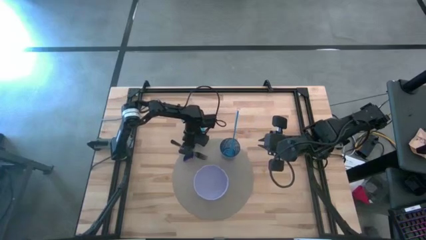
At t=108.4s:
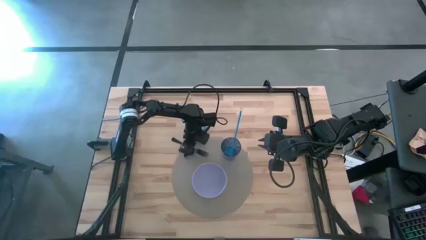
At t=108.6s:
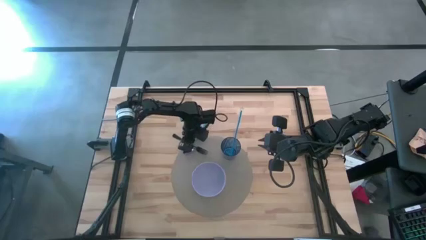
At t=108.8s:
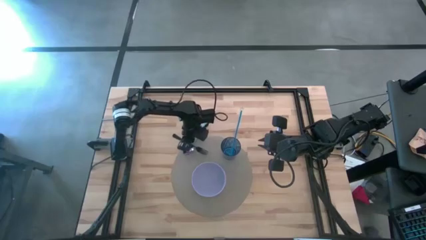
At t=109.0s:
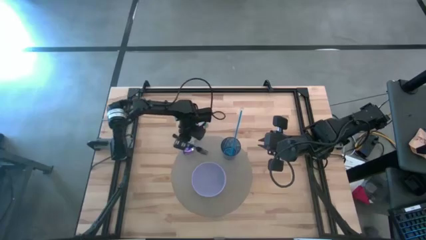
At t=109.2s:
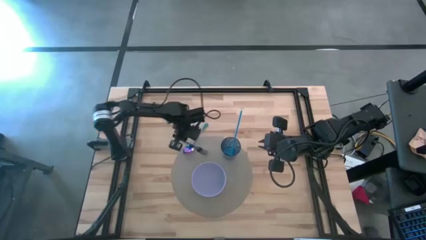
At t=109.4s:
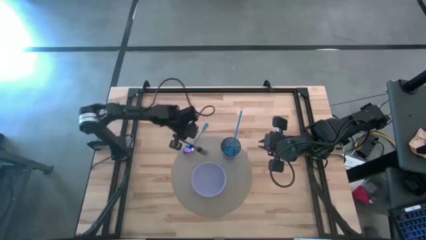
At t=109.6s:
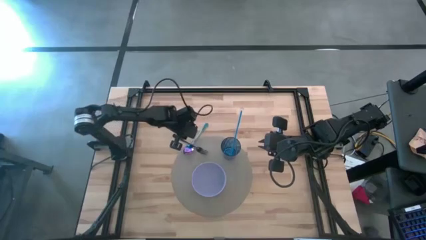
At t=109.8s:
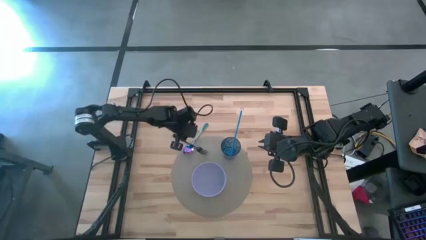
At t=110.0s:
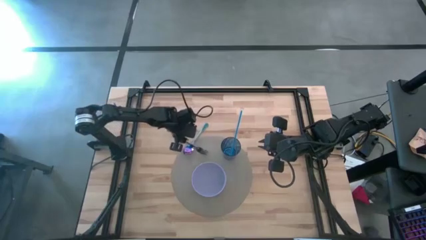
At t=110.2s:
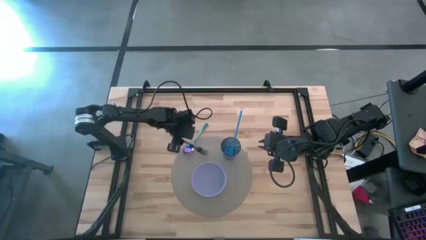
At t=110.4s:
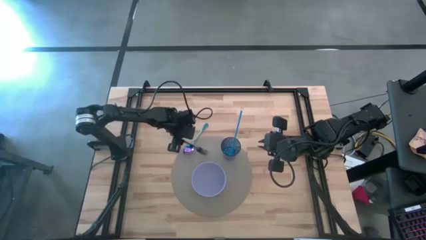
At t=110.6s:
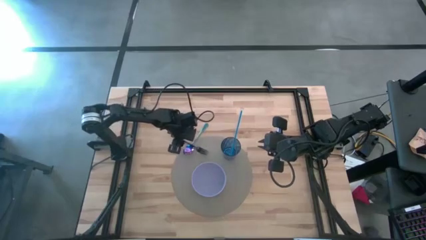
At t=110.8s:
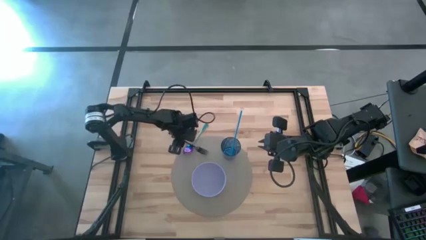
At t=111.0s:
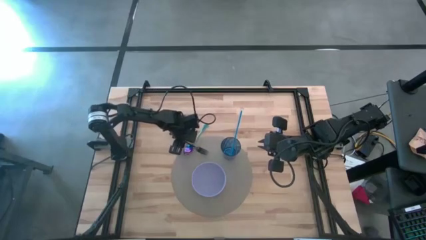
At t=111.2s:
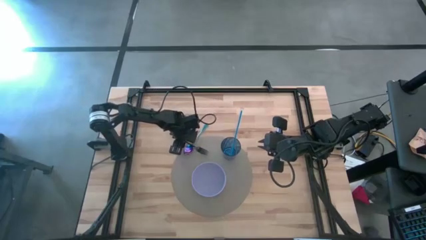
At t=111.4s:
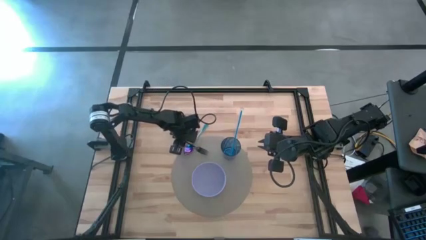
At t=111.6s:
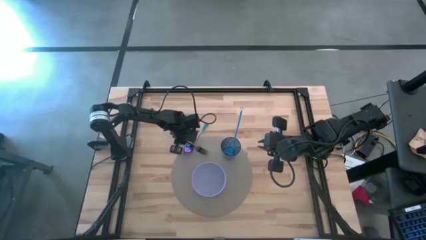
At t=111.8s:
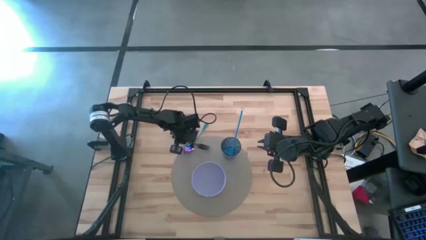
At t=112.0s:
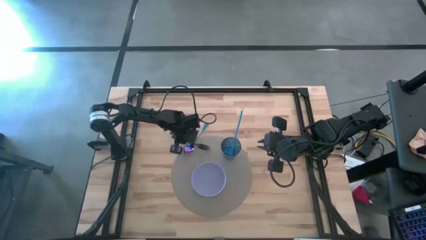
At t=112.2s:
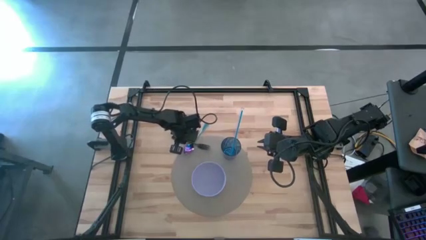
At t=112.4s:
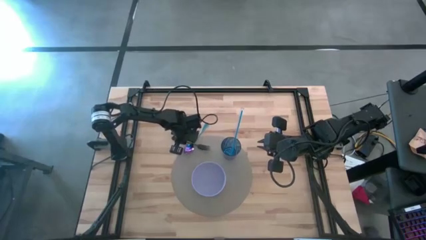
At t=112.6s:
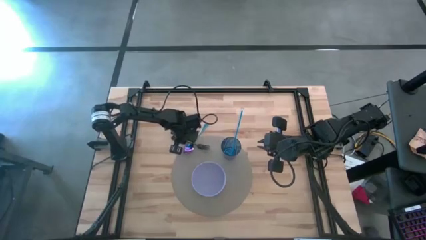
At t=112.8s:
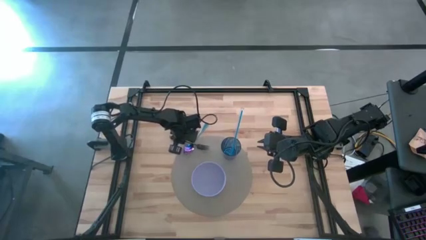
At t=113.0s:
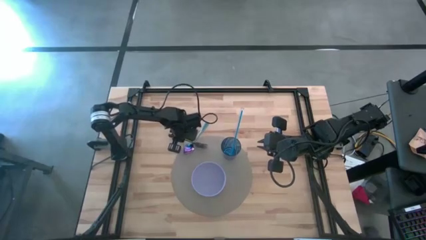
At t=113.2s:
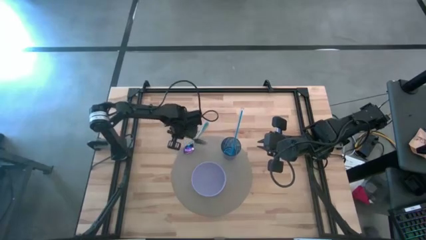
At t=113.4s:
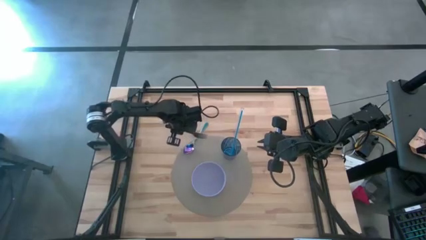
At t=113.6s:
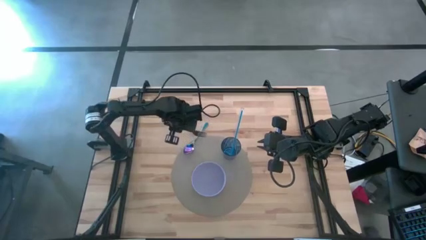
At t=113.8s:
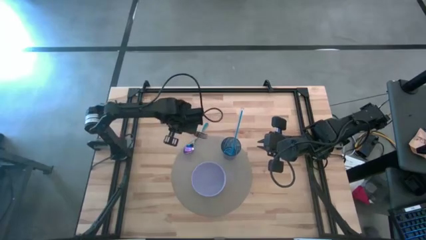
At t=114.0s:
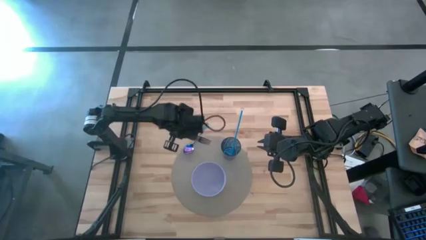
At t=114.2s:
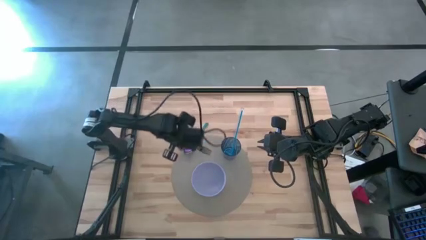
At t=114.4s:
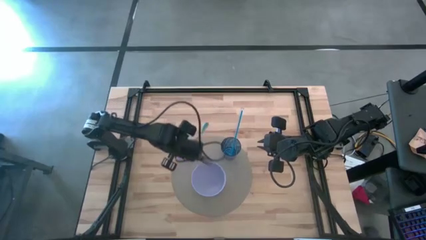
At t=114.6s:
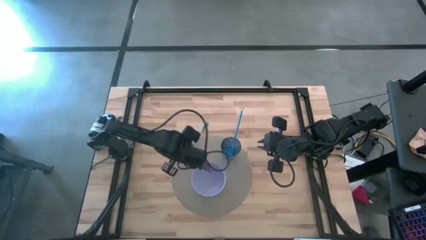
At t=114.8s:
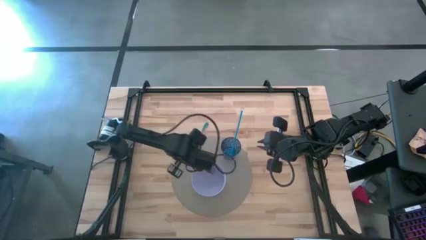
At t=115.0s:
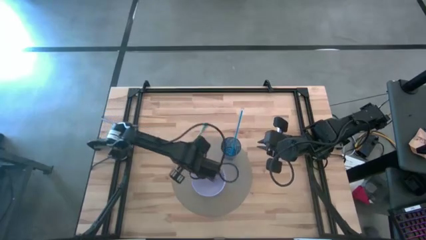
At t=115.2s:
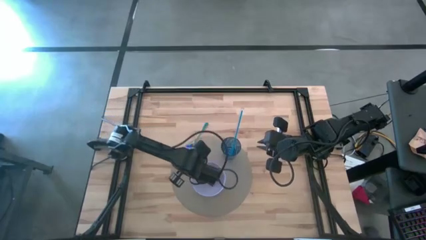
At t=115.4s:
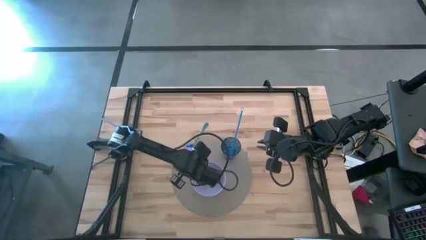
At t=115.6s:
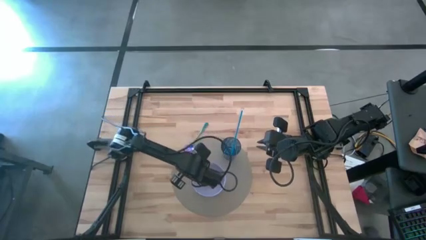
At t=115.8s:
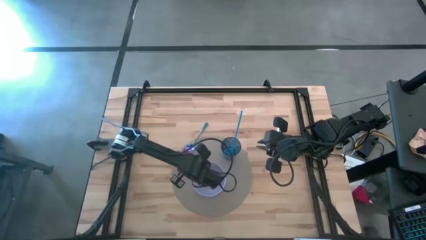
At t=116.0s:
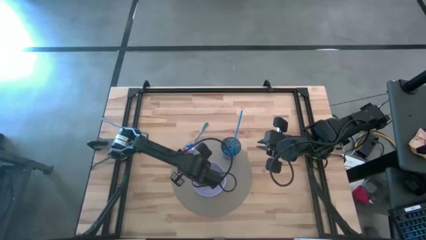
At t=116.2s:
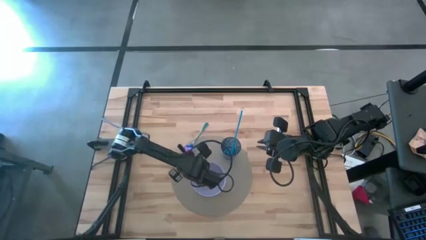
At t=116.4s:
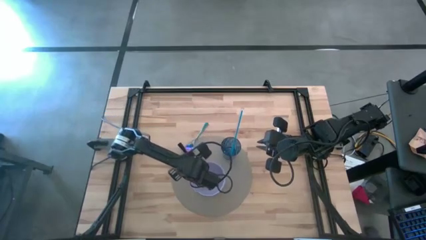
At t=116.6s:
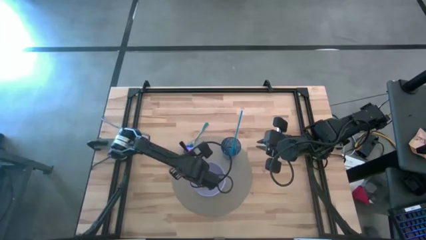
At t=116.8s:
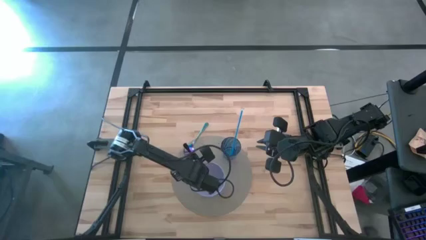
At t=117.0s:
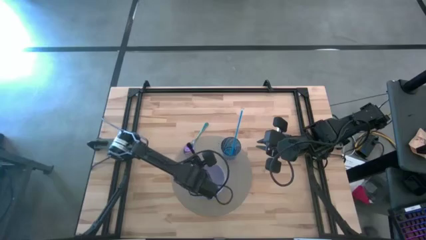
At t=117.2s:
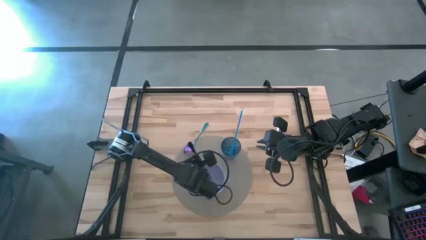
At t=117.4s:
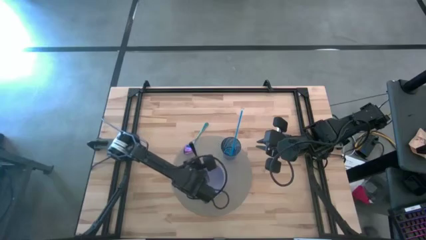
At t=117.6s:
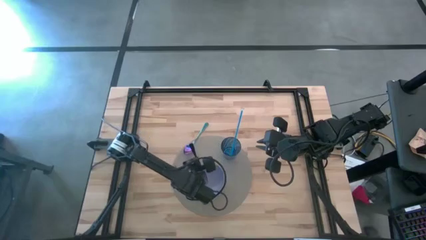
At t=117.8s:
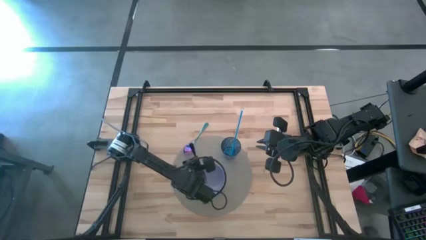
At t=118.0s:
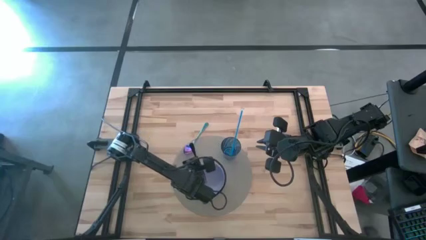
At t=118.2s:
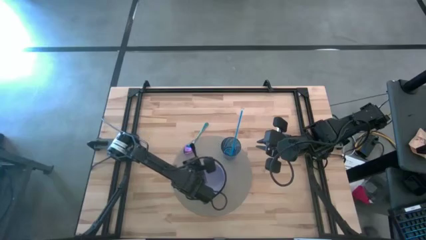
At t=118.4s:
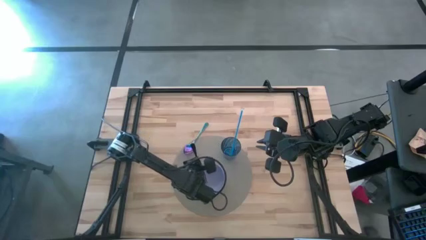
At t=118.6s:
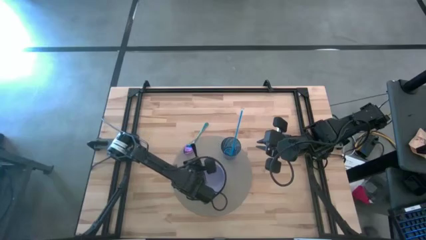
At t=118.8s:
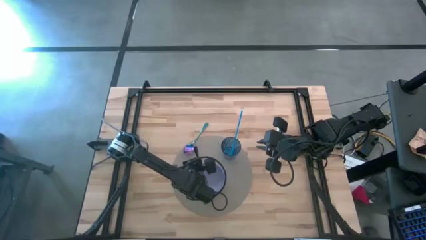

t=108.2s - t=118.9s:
Task: Pick & Place Utensil
Put the fork into the bowl

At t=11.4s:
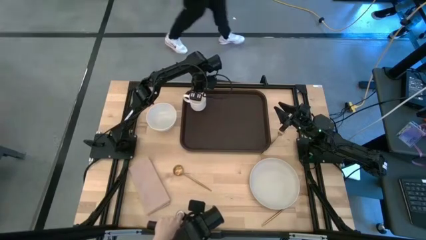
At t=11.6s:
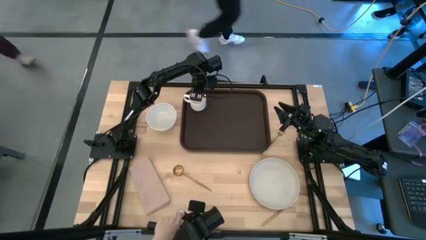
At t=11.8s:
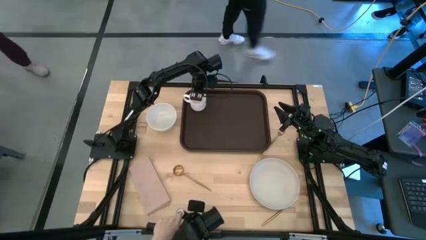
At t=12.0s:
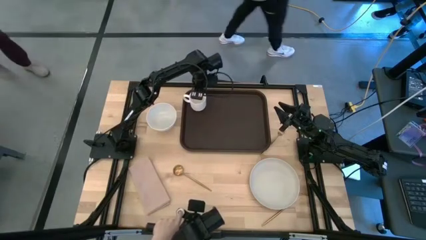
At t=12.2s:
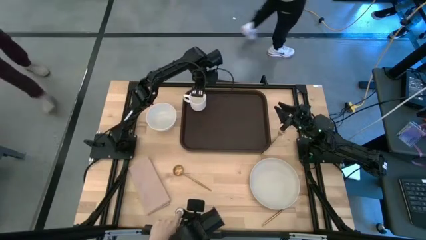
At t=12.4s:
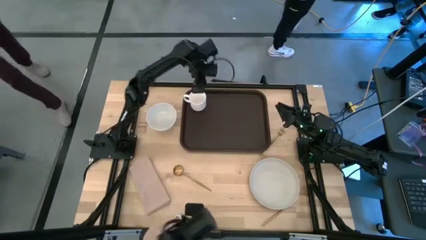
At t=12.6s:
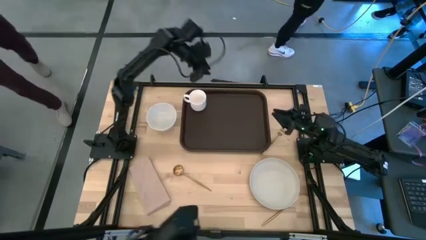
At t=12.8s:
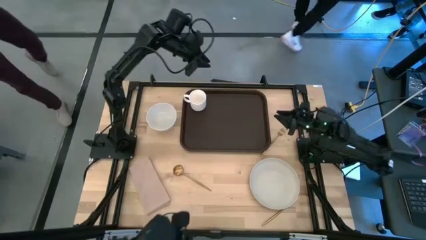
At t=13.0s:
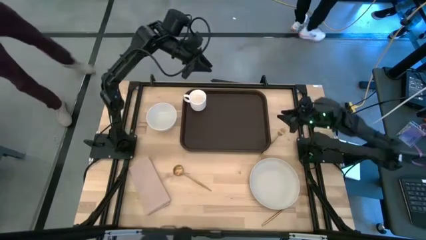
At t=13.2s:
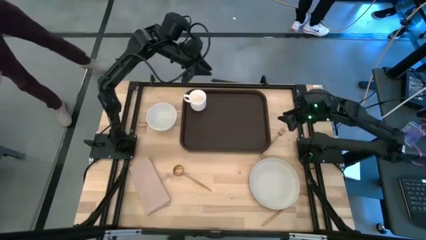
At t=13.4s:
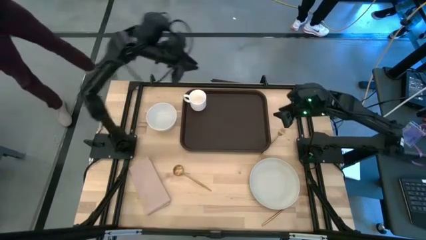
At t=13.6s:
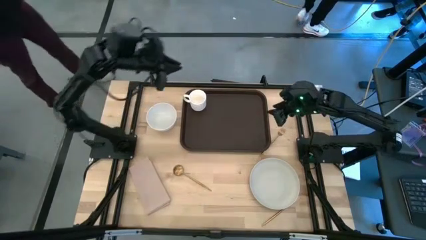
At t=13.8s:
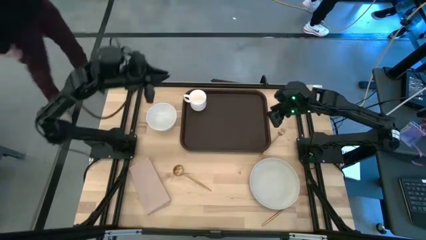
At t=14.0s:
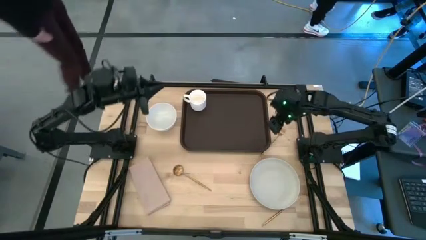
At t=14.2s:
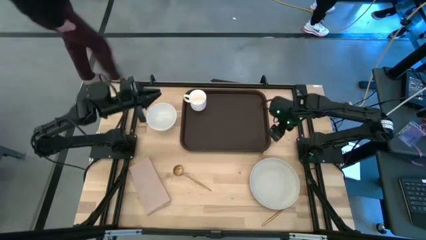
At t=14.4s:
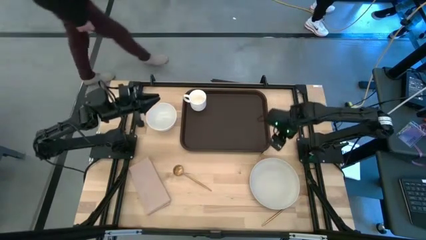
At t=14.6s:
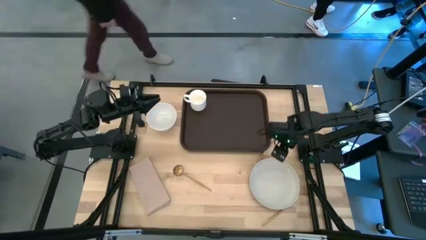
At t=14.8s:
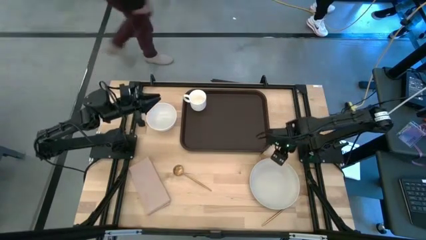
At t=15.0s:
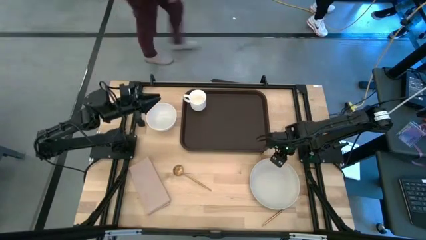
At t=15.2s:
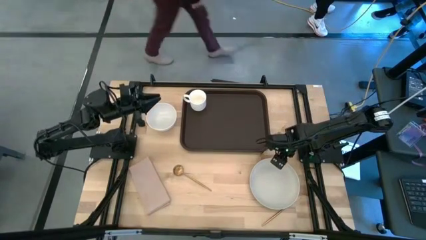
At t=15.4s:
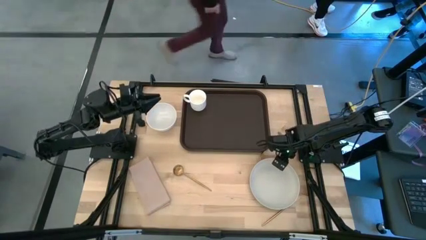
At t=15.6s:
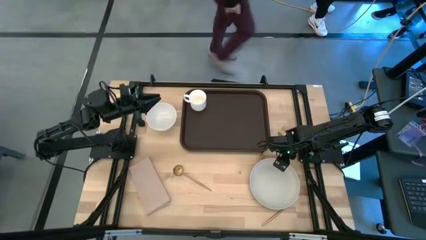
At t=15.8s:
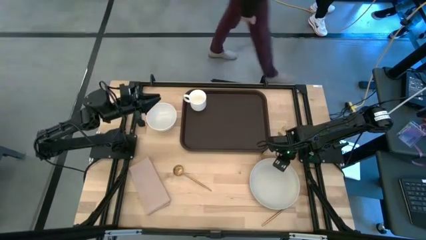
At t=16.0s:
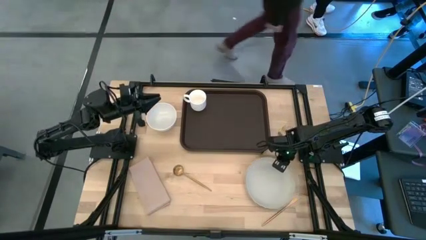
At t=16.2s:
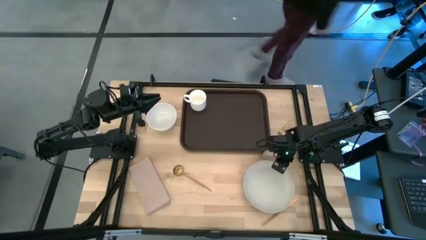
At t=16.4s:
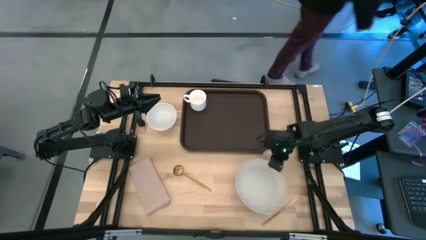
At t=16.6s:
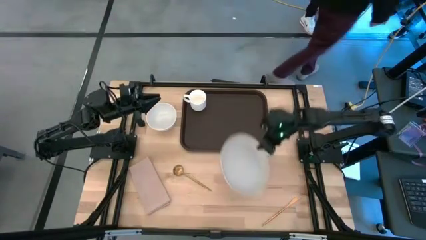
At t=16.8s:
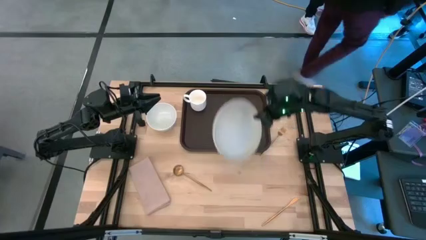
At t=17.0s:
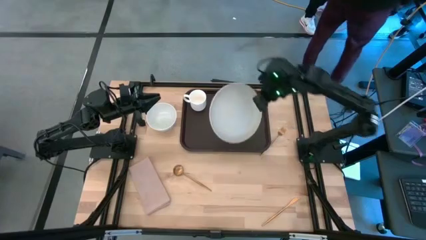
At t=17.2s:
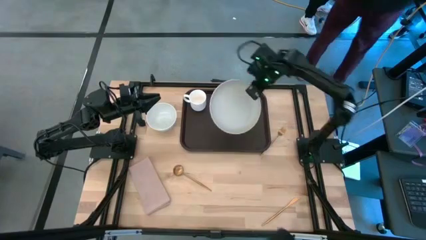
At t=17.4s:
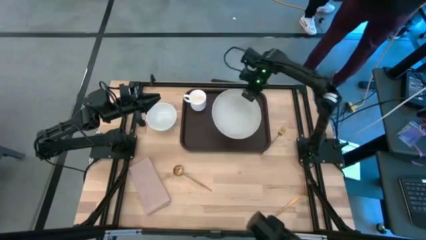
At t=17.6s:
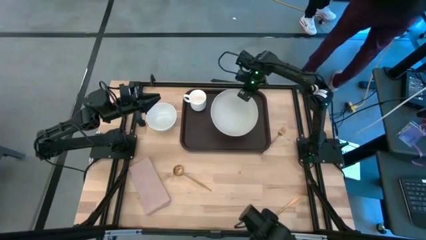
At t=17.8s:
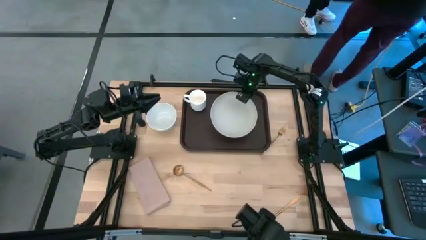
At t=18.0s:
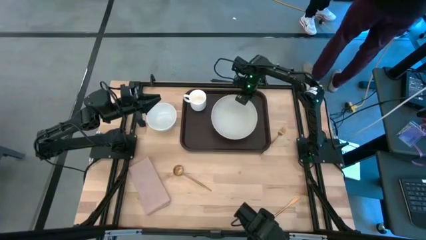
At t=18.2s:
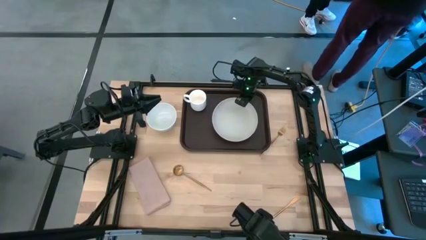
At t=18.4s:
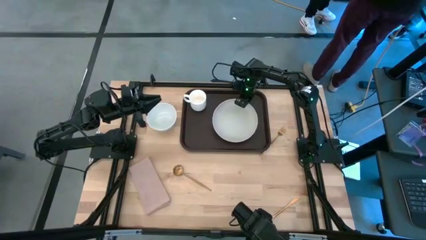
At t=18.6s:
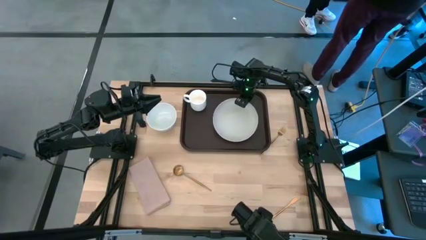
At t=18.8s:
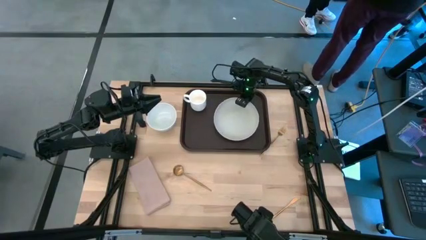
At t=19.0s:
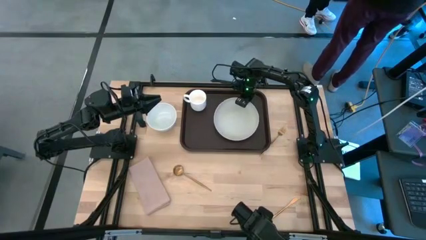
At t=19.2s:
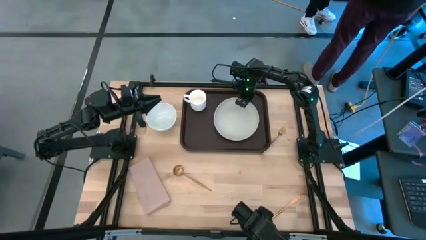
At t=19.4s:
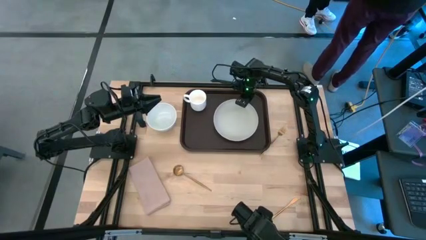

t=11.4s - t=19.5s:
Task: Set up tray
Put the gray plate on the brown serving tray to the bottom right of white mug
